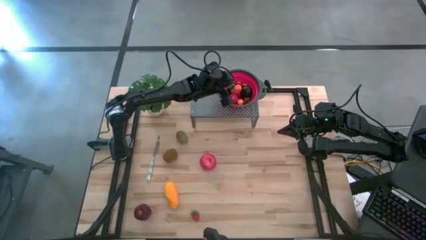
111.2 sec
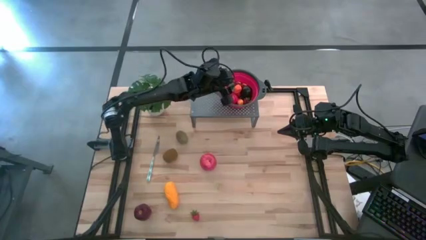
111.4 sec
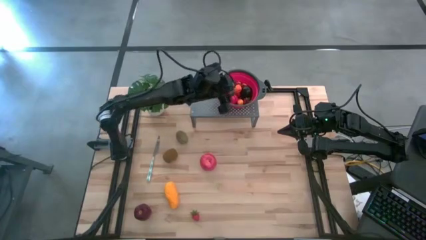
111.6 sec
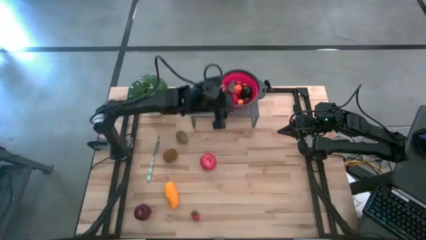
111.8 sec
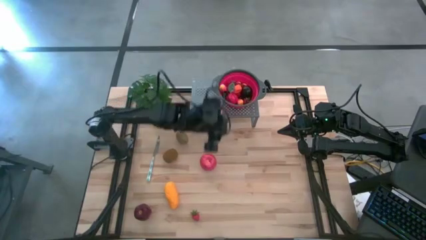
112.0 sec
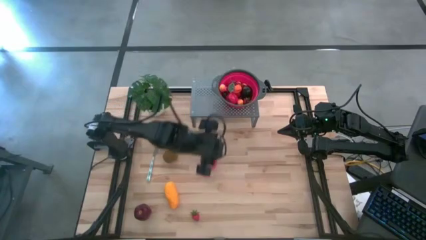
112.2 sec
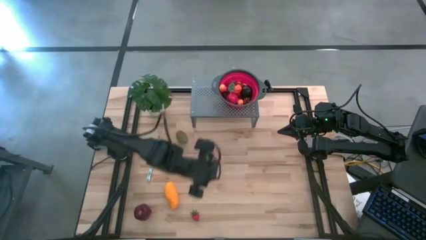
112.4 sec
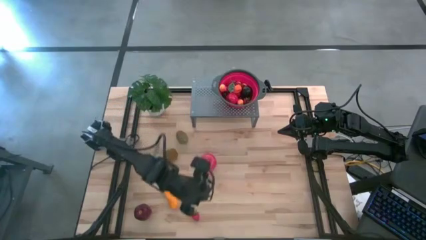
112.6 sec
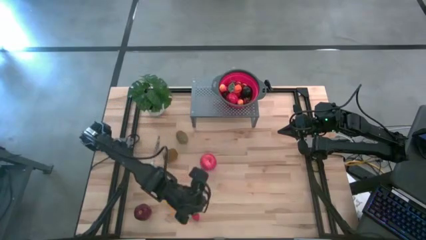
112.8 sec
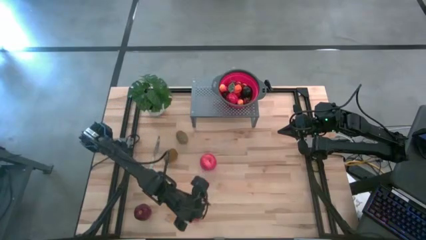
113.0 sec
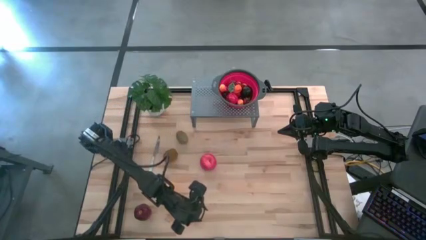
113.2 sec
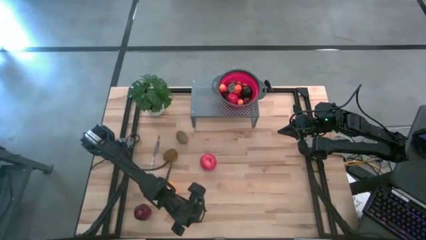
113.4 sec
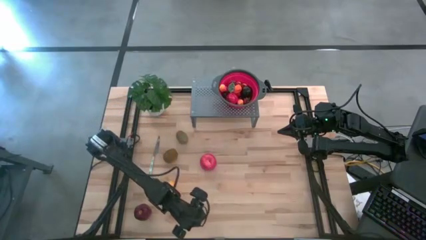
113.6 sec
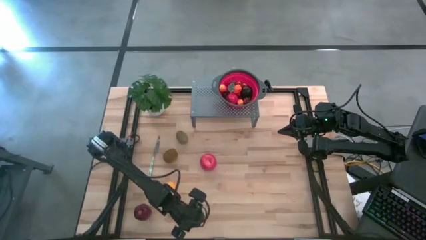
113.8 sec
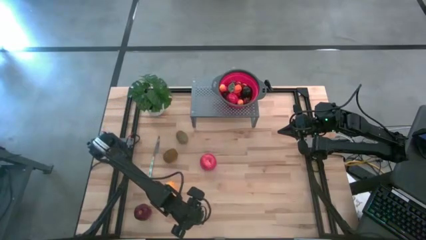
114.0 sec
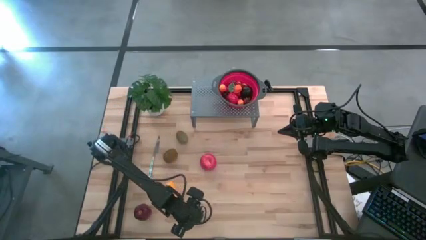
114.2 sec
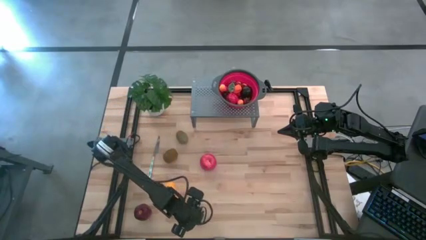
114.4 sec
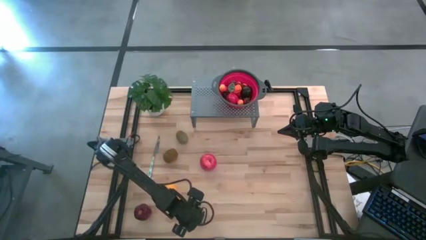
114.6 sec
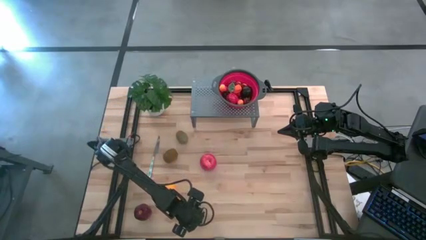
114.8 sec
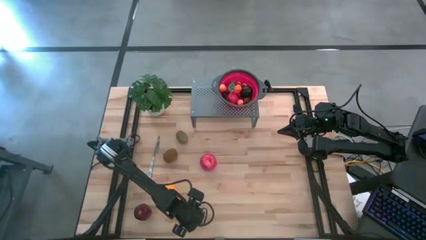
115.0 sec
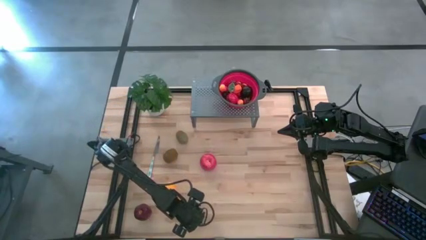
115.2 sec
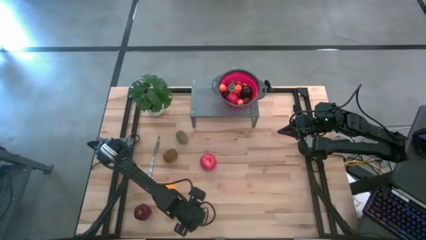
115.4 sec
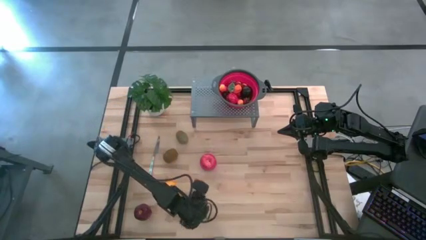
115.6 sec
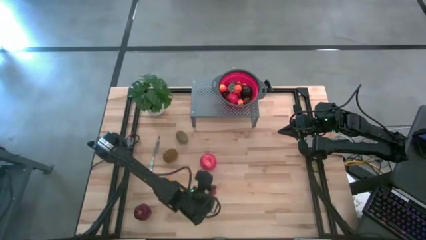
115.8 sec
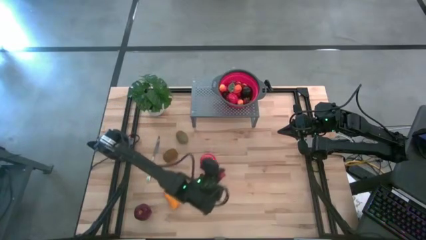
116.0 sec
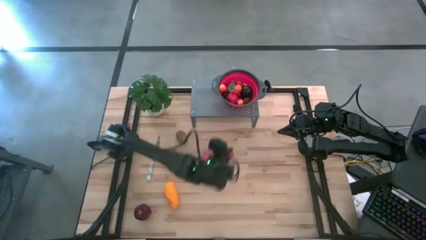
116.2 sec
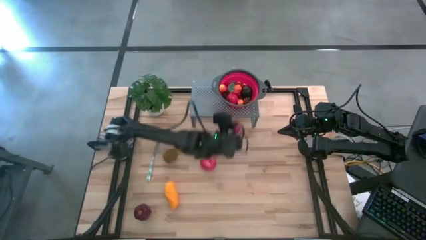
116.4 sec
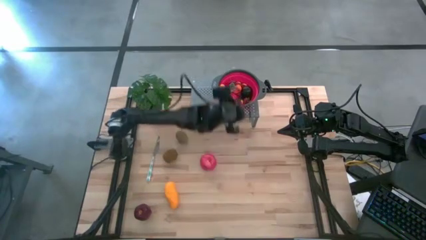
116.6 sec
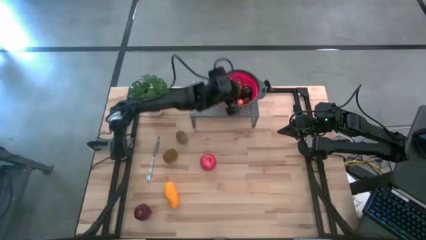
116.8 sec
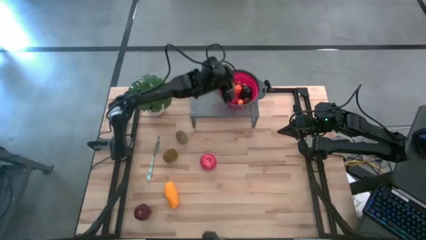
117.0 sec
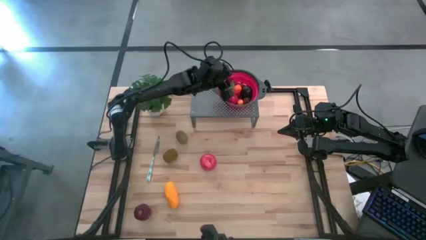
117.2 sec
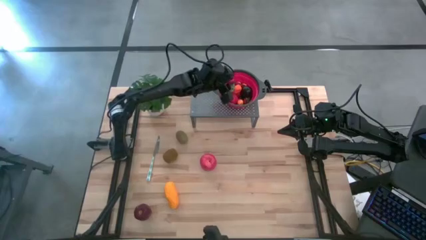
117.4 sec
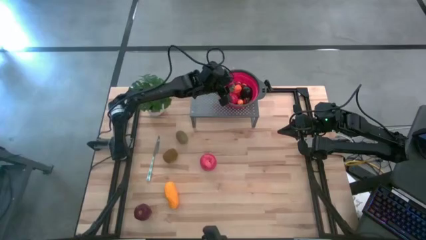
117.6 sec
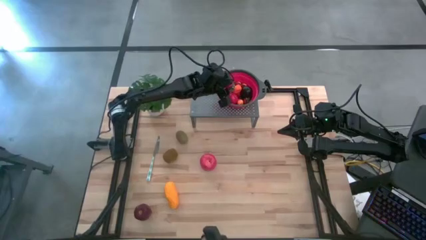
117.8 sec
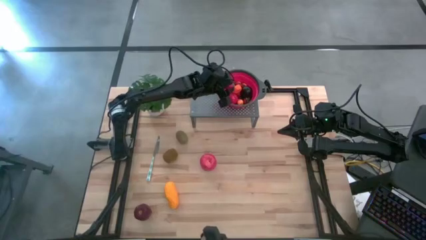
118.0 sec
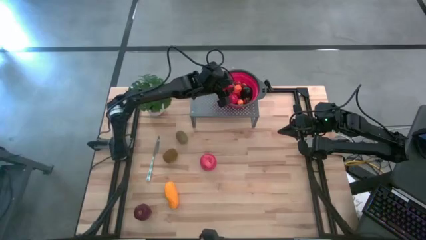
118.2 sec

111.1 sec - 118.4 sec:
Task: Pick & Place Fruit
Put the strawberry into the strainer bowl on the shelf

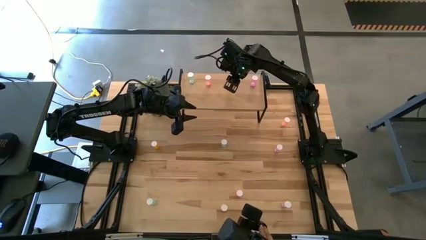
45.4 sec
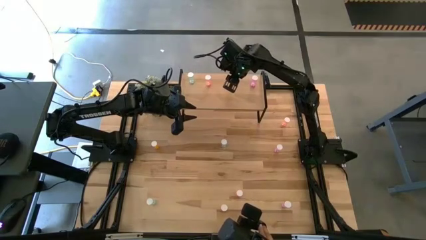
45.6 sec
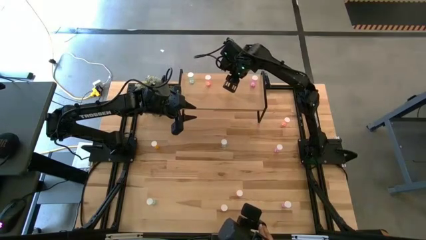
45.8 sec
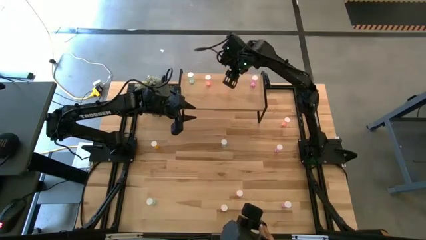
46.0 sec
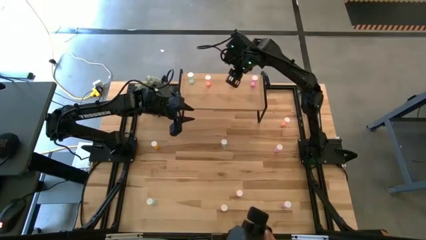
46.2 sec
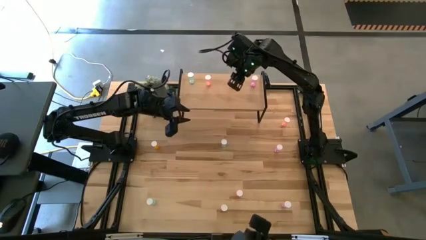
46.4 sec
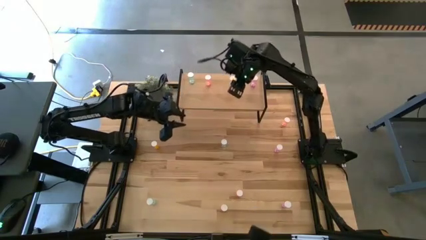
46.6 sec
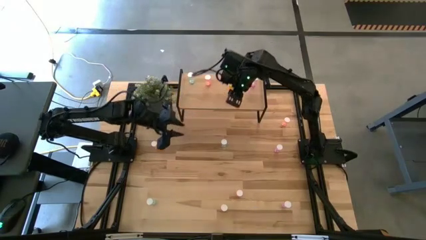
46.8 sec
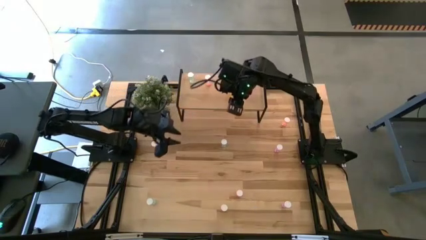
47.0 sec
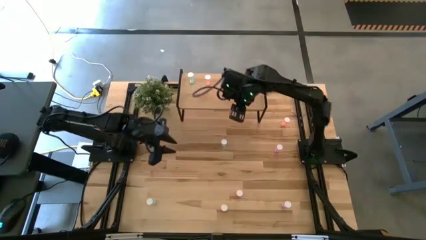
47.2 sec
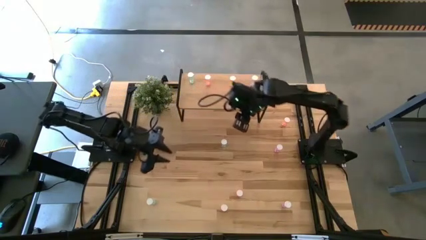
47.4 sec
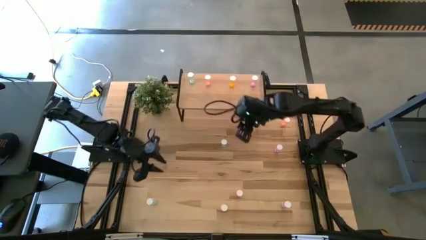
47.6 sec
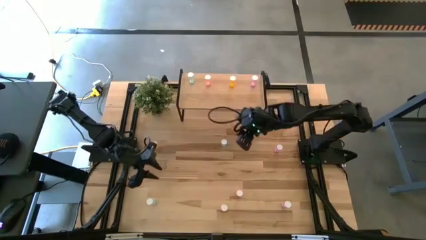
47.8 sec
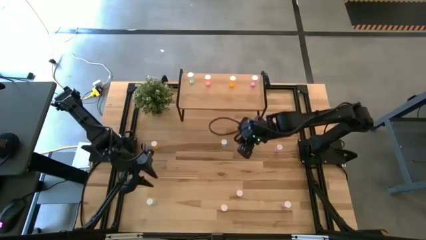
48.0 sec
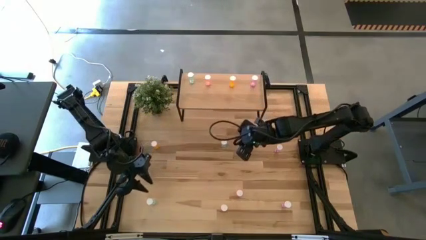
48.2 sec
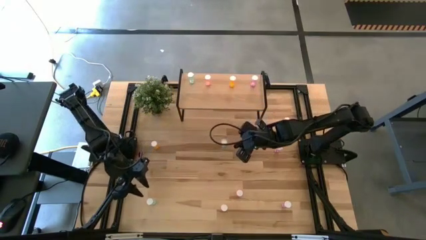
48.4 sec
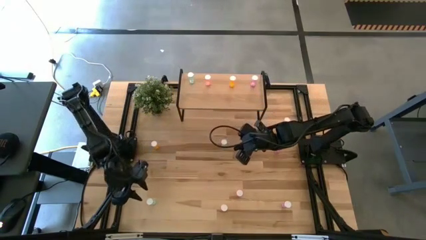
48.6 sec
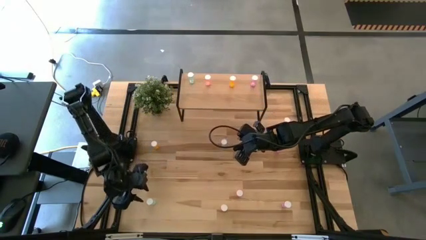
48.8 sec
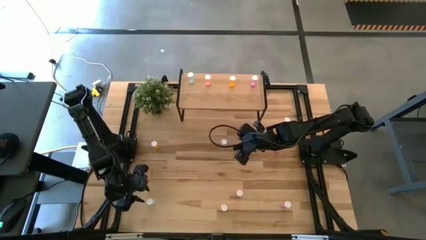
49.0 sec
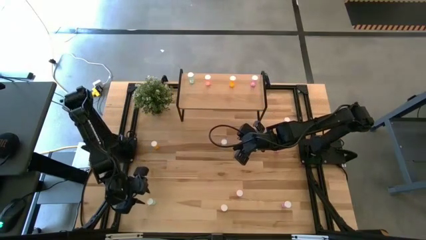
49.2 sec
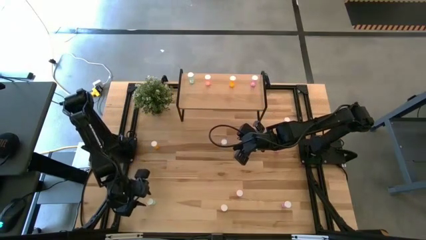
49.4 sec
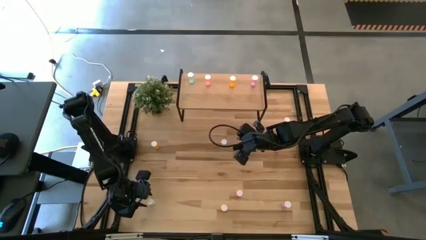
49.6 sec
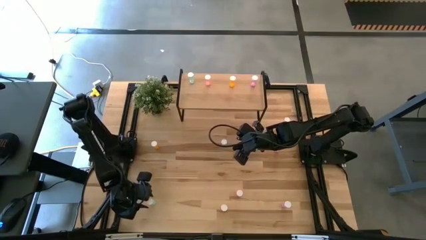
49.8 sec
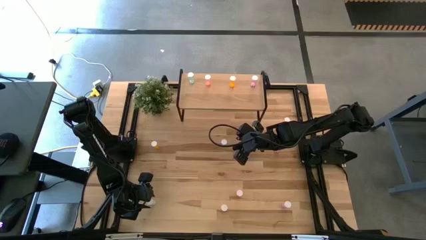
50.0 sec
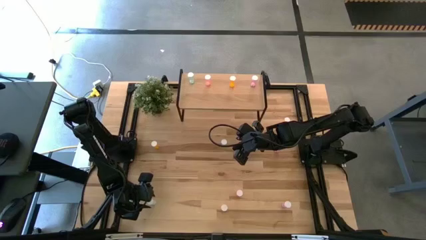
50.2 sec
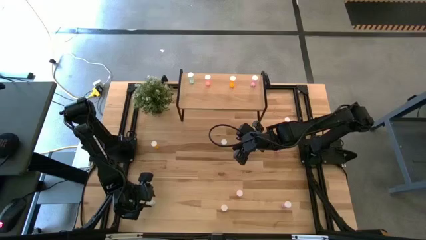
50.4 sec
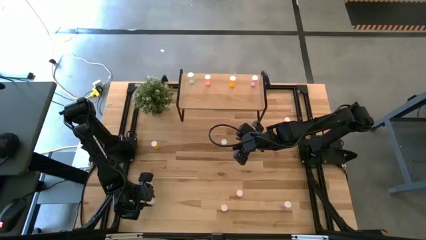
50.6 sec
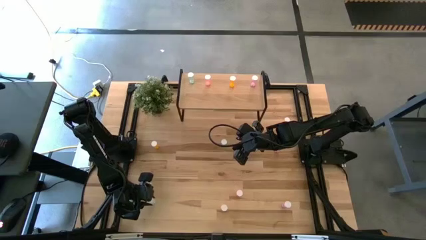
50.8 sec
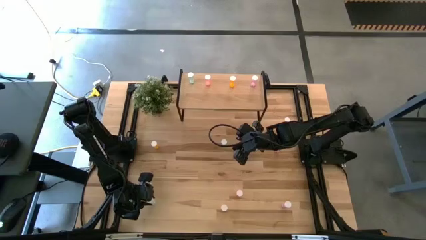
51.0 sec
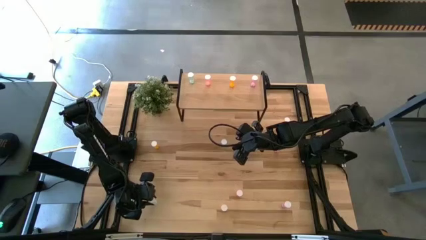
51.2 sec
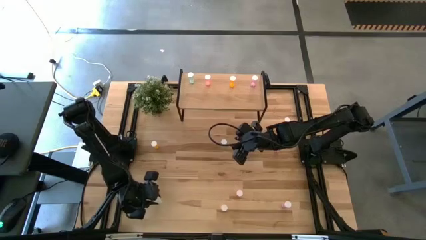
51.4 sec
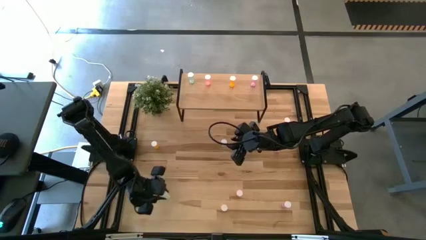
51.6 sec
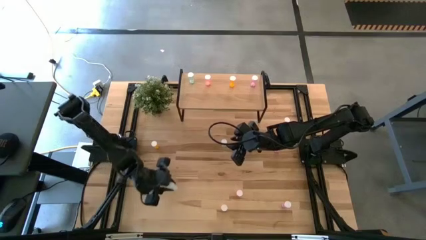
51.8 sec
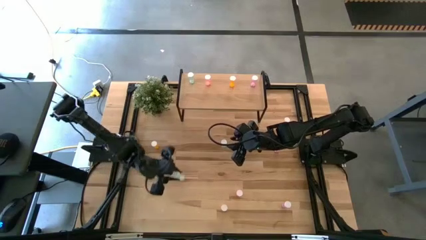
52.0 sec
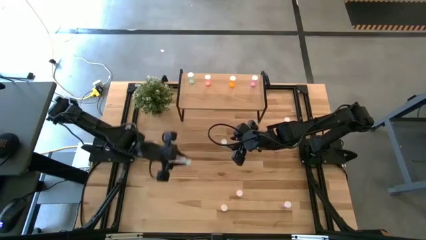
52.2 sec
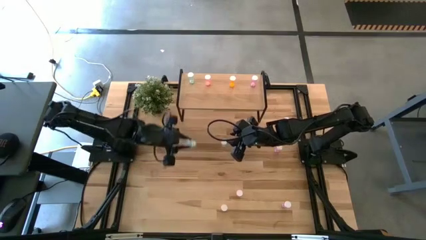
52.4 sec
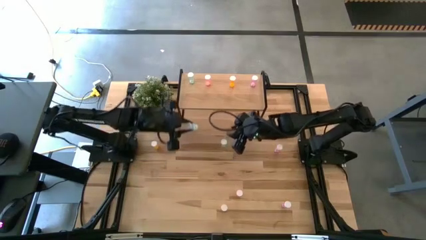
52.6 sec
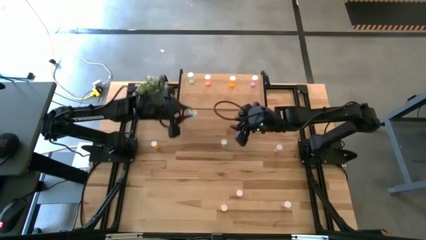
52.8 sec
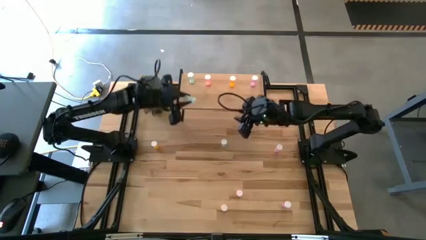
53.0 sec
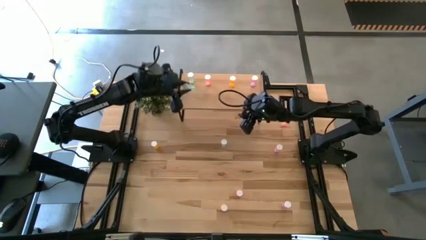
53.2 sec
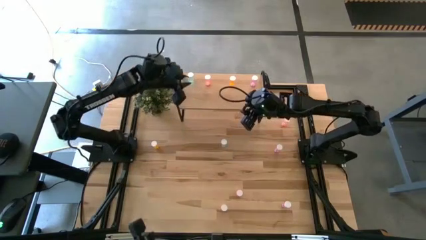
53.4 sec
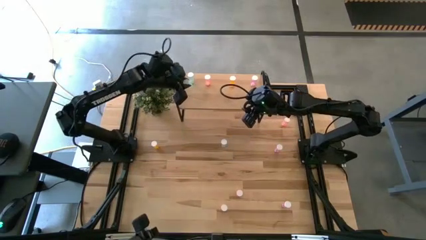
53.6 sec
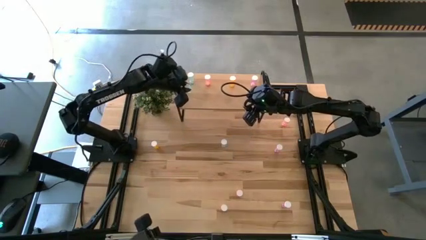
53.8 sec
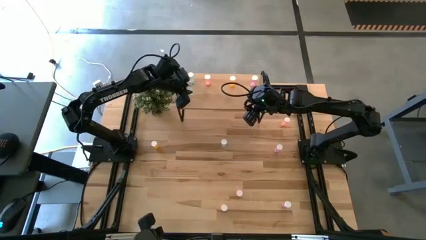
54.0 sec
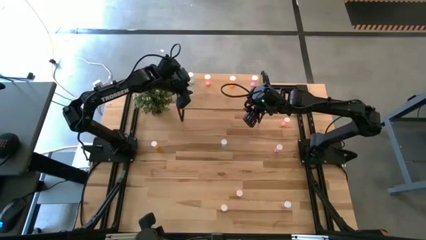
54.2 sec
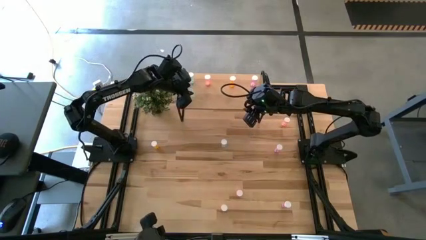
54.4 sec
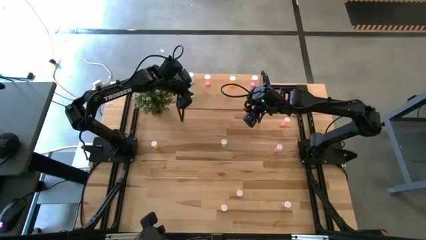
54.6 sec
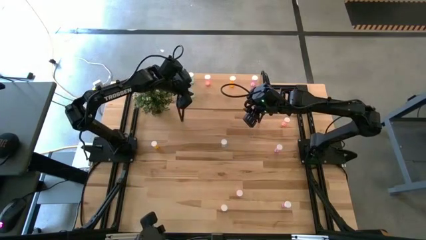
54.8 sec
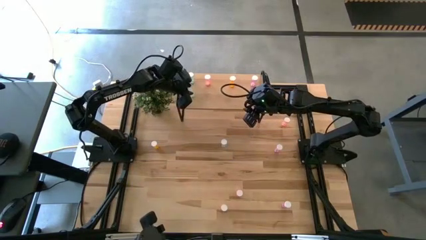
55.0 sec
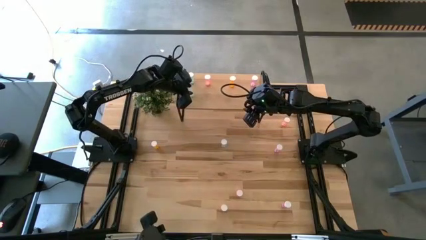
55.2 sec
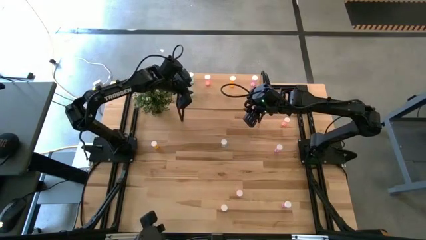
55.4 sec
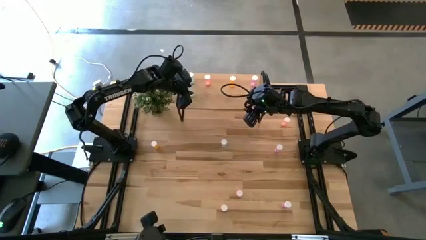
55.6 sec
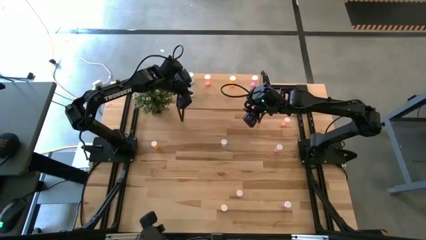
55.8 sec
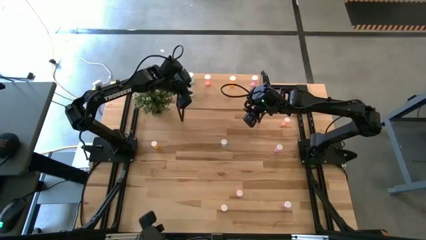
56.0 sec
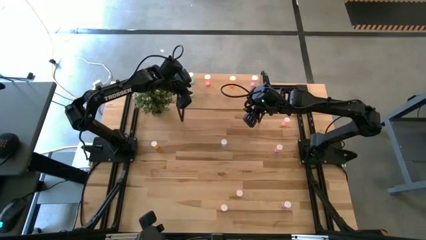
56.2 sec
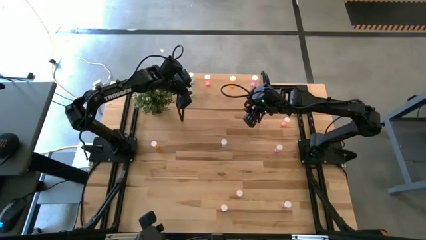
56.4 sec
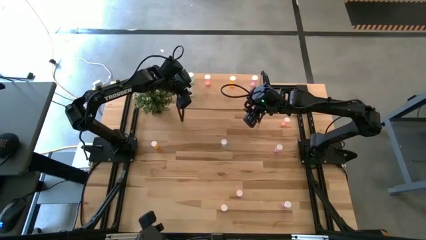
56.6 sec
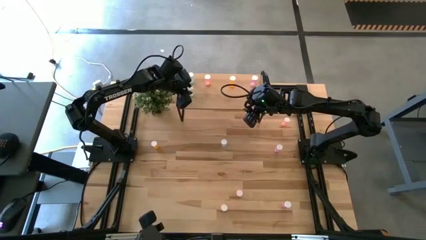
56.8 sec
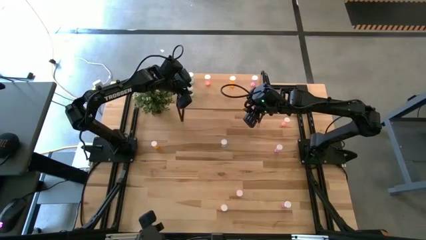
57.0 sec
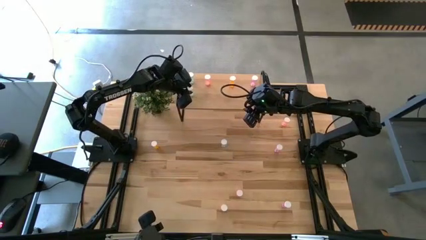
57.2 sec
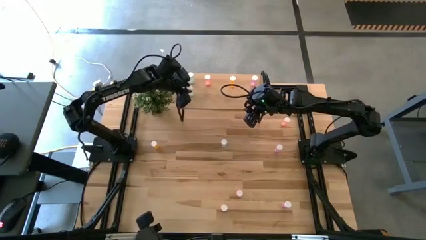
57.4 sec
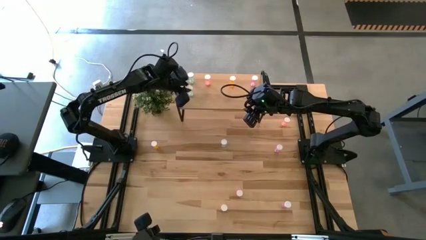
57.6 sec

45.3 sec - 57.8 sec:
Task: Pick and place medicine bottles onto shelf by color
Put the bottom blue pill bottle on the shelf aligned with the other blue pill bottle
